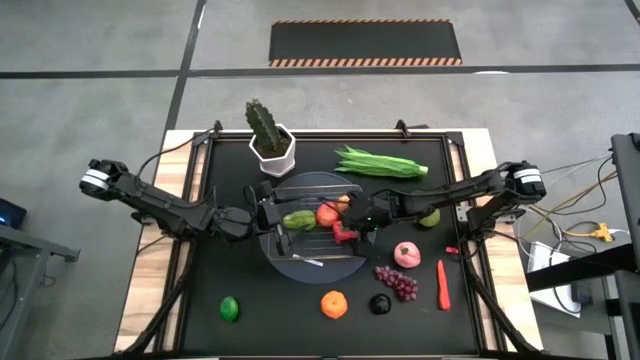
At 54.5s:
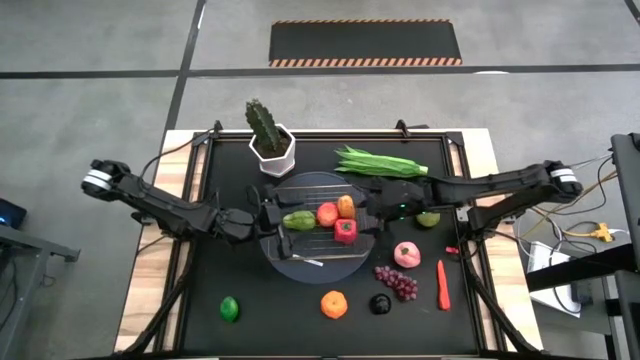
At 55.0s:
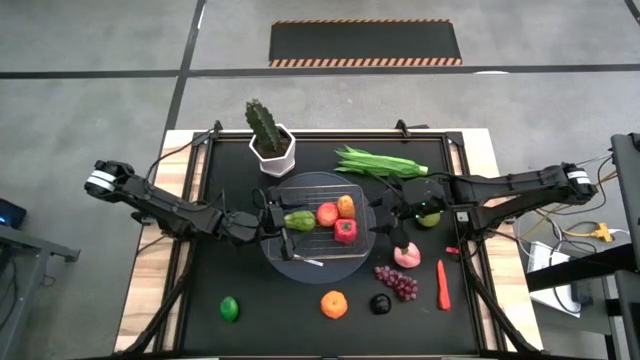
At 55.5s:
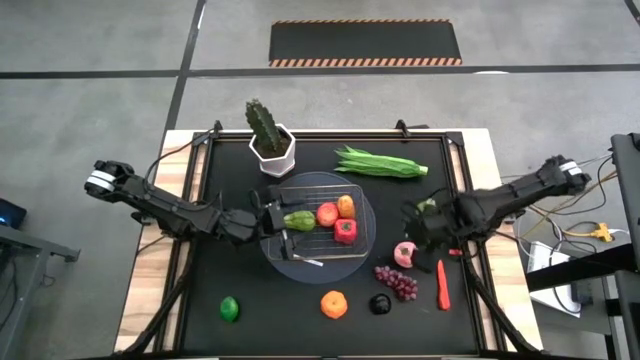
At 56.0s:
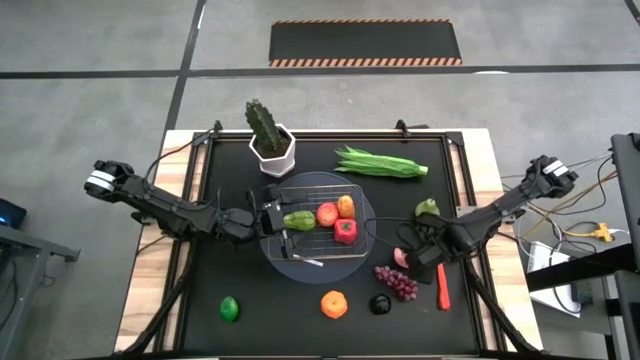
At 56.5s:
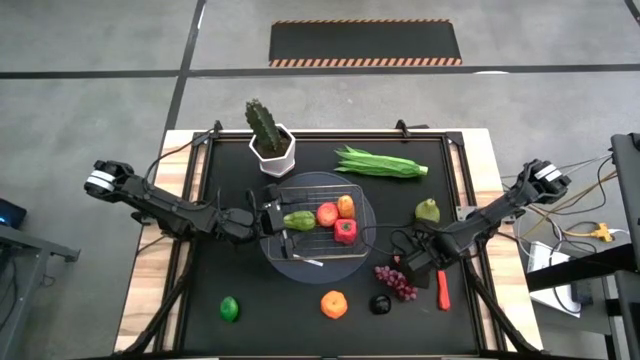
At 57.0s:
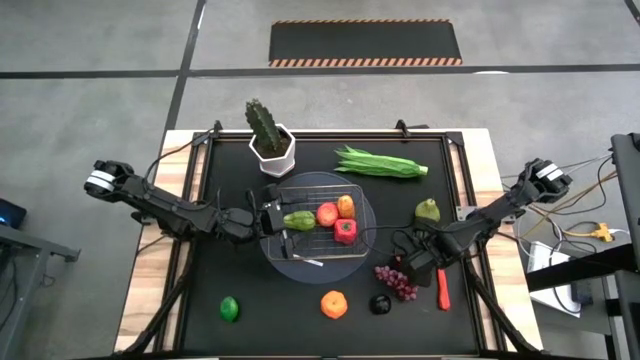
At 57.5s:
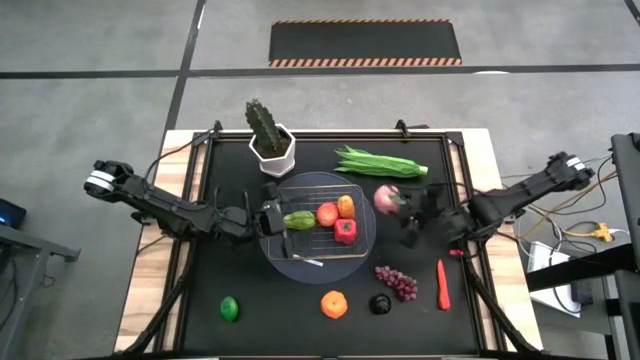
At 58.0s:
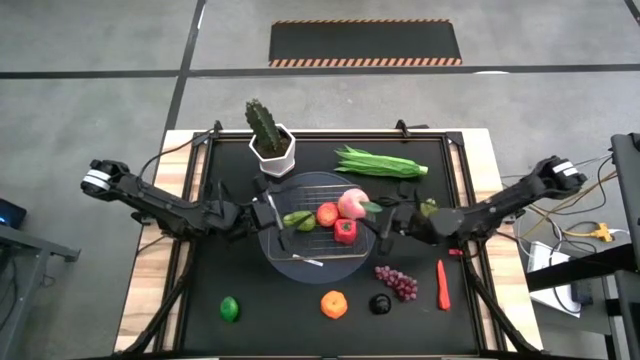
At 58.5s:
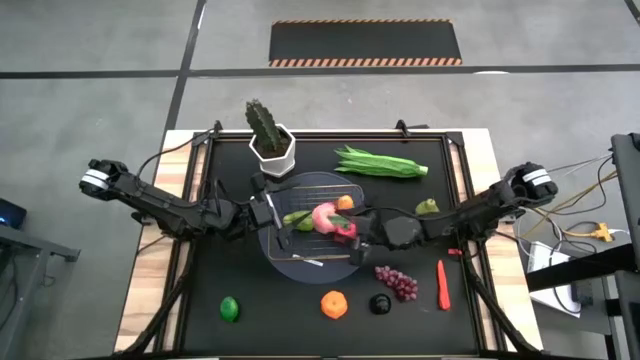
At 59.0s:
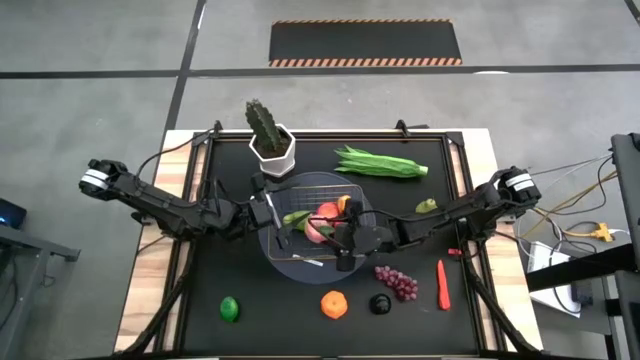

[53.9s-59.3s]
Task: Build produce basket
Put the peach into the wire basket

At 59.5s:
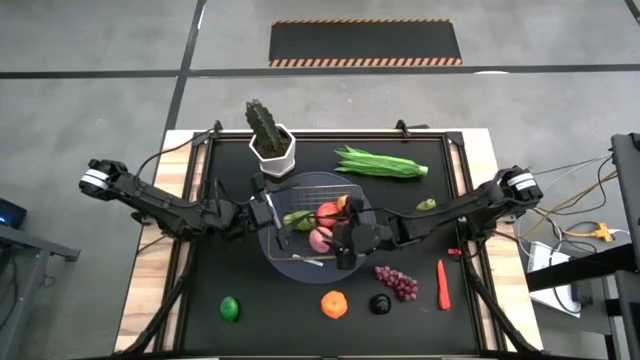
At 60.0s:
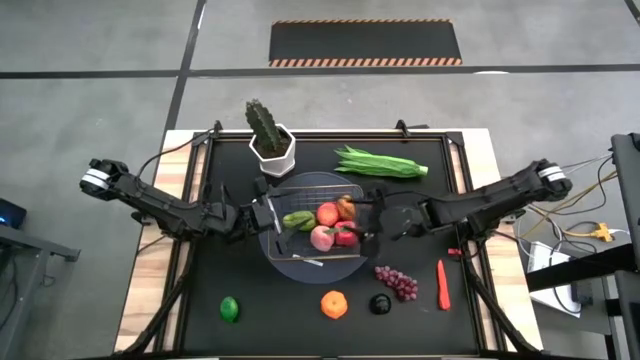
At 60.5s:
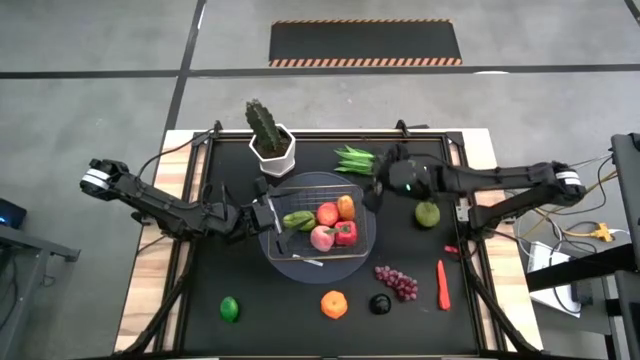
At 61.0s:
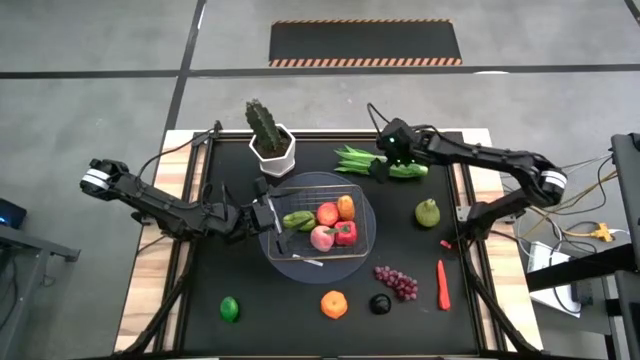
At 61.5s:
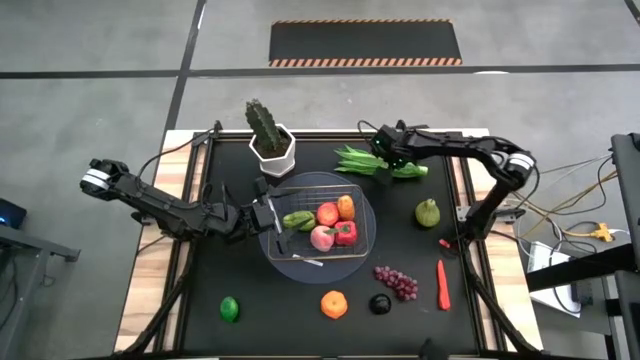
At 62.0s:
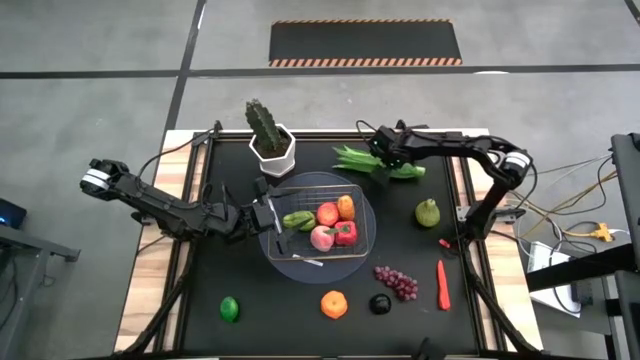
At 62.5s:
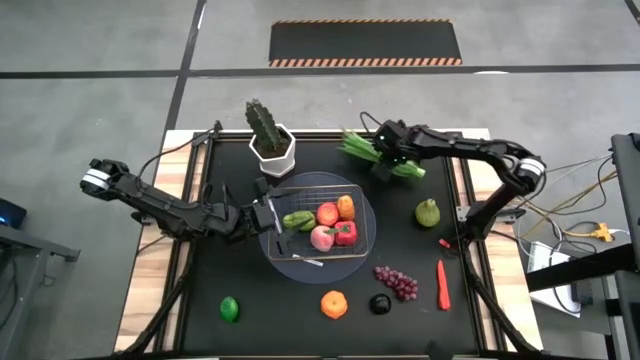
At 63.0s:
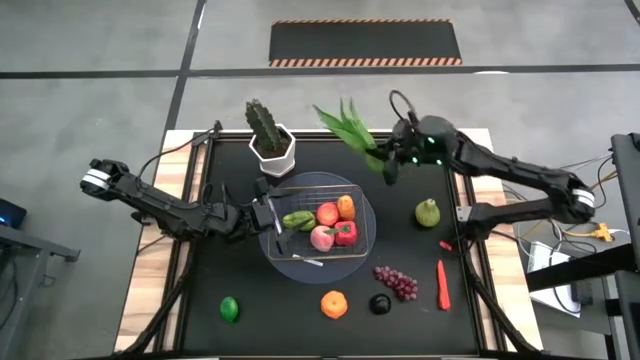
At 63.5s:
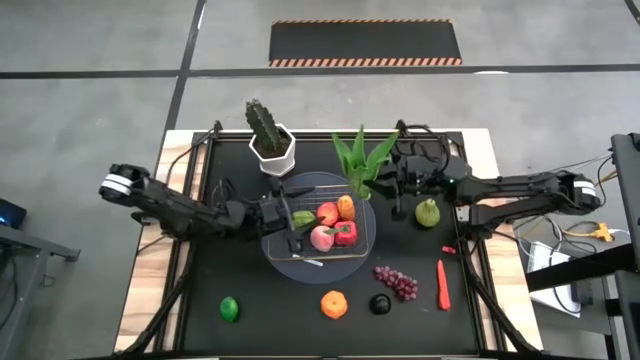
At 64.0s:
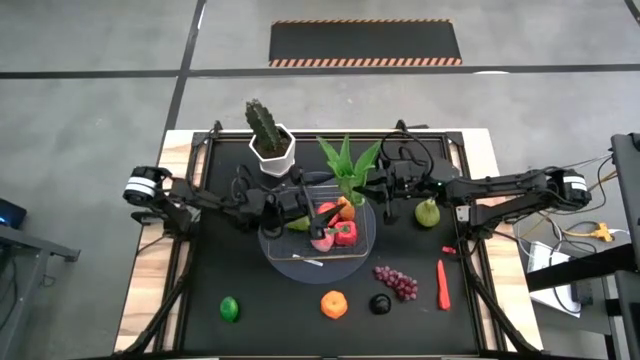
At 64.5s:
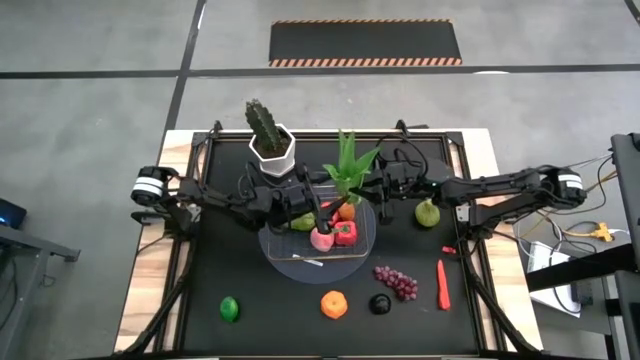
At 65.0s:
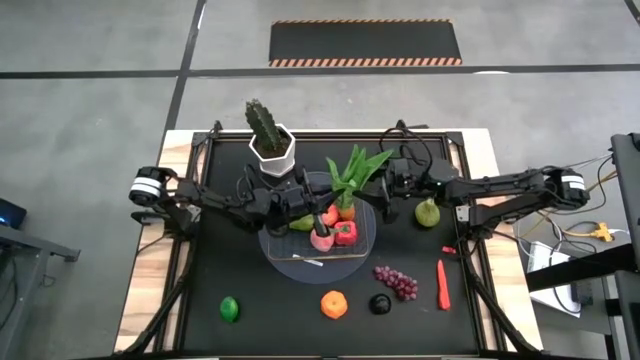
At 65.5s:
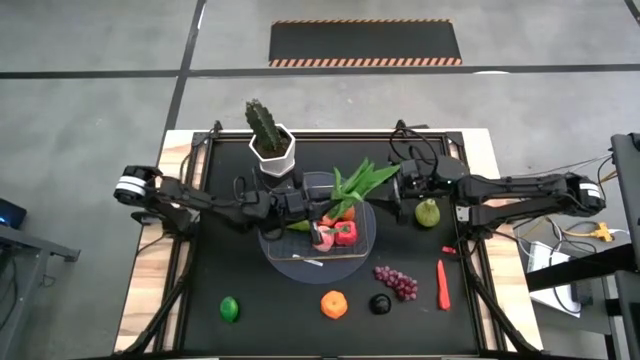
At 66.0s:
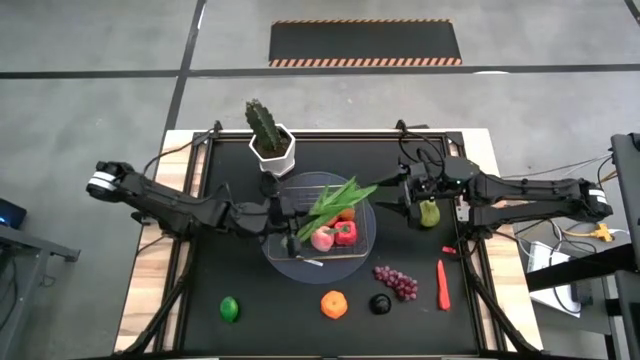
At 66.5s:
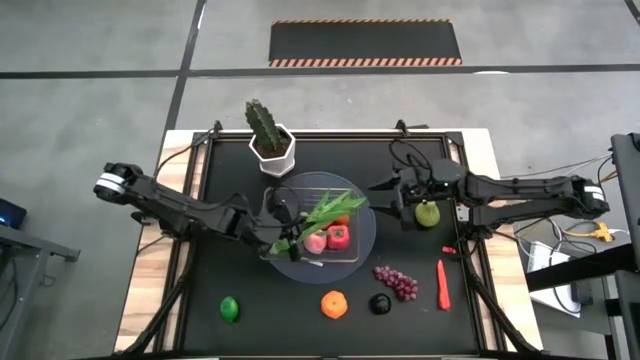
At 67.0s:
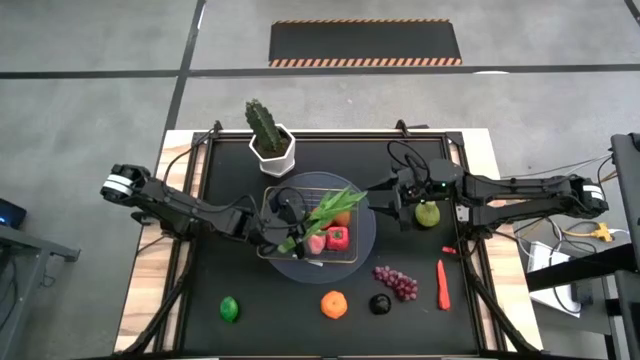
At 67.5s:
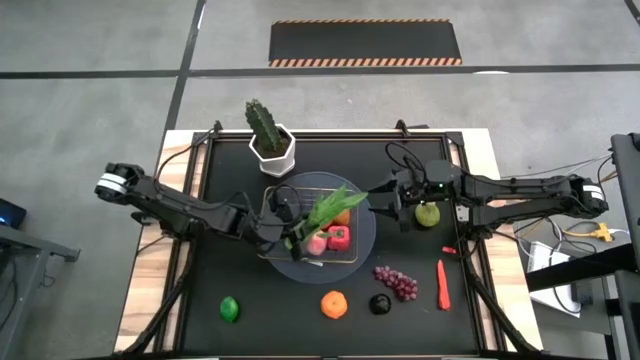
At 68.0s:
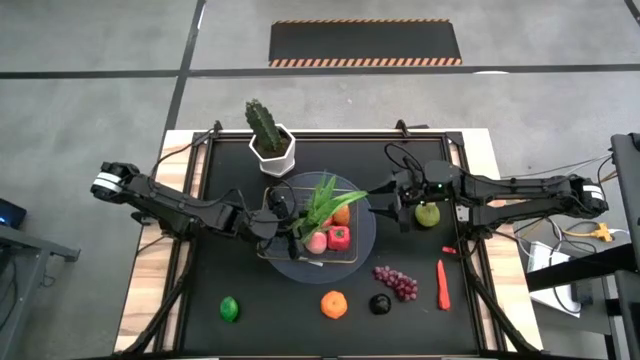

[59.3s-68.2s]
Put the celtuce into the wire basket

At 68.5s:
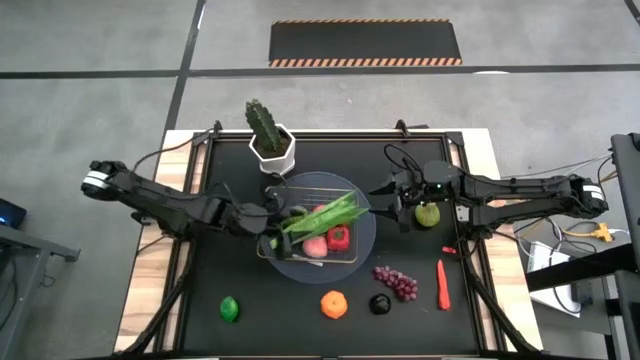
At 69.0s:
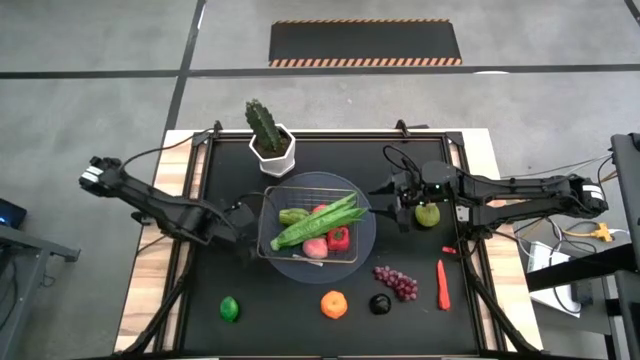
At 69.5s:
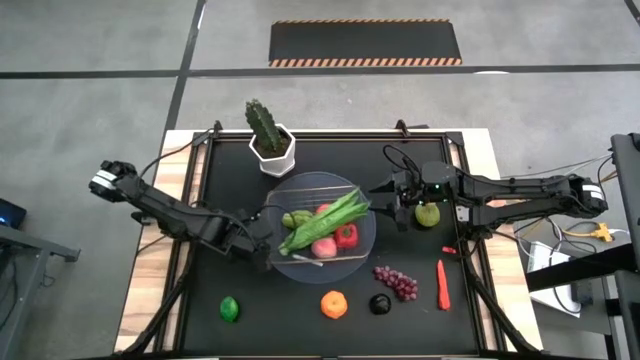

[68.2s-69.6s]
Adjust the wire basket

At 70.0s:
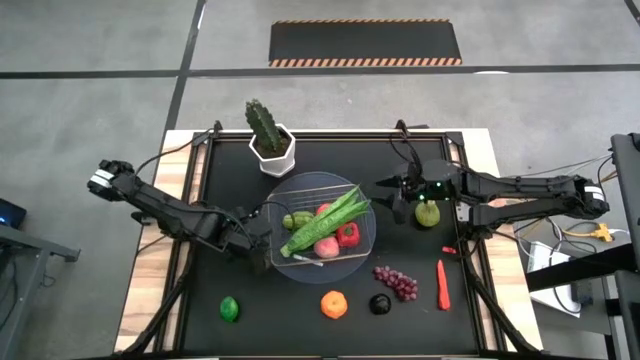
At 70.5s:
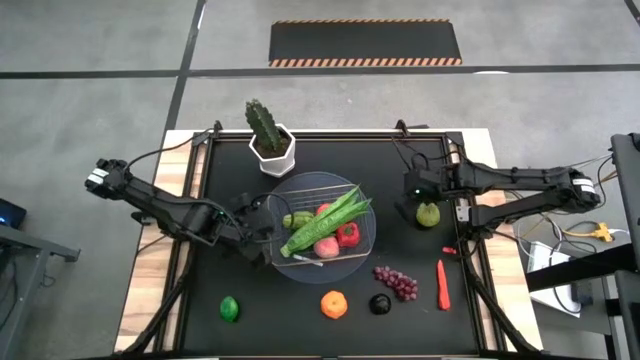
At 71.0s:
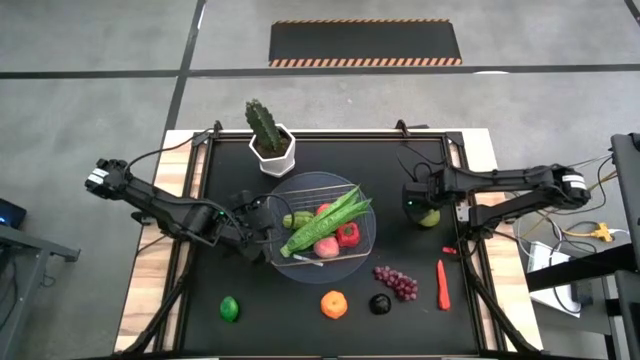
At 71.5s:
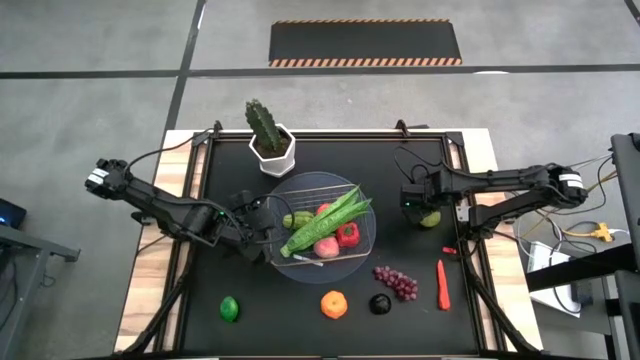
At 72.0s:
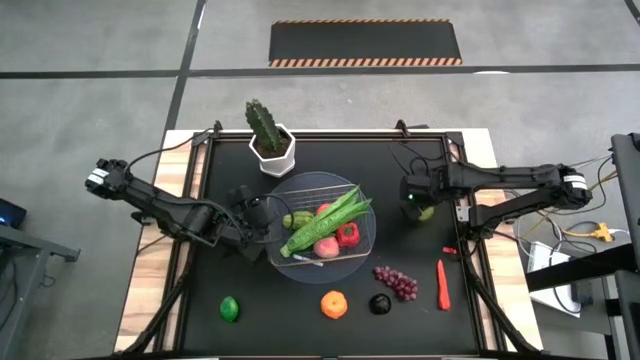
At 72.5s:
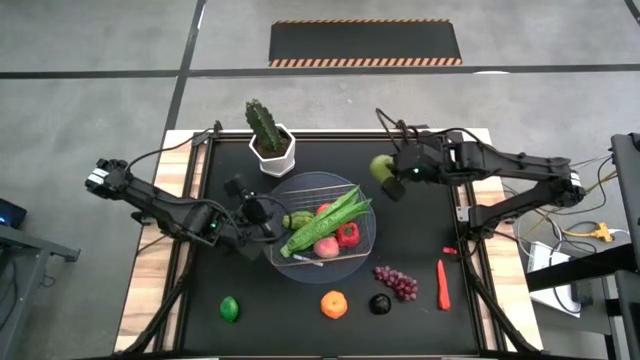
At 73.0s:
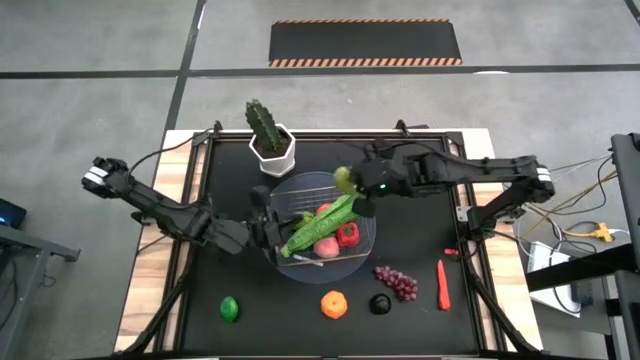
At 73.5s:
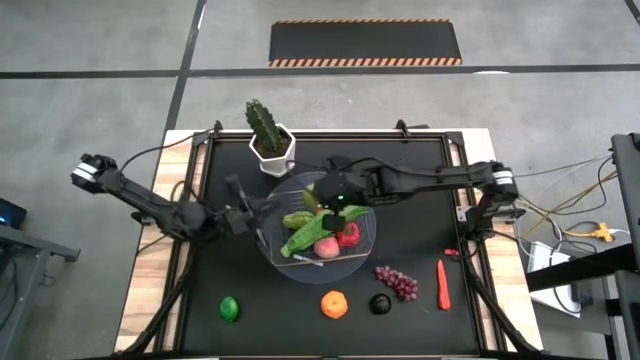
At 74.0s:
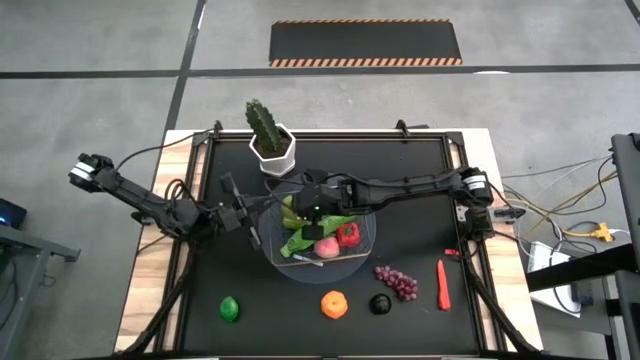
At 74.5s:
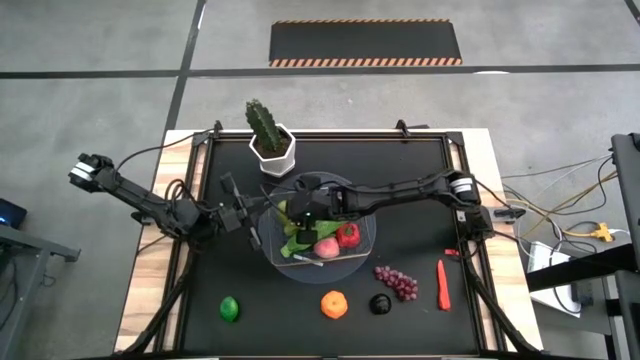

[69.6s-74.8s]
Put the pear into the wire basket
